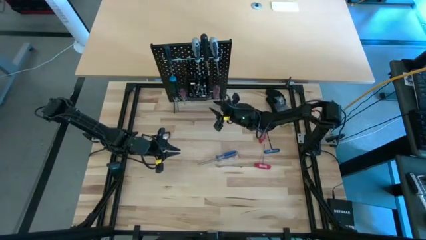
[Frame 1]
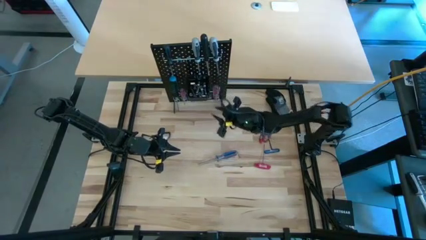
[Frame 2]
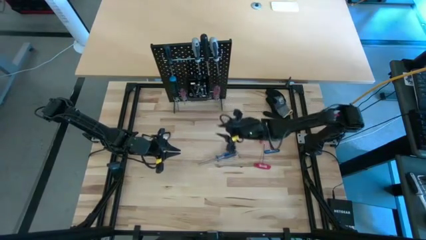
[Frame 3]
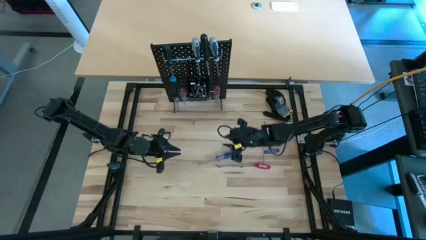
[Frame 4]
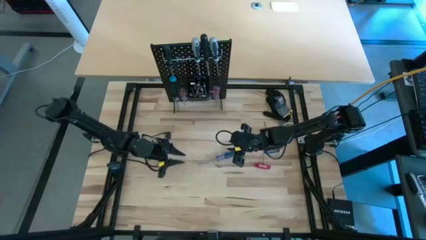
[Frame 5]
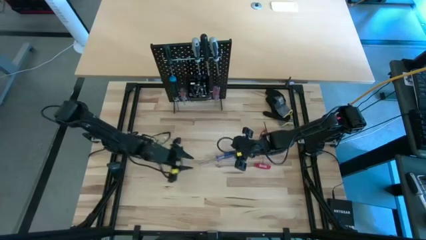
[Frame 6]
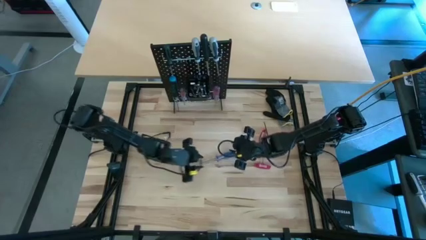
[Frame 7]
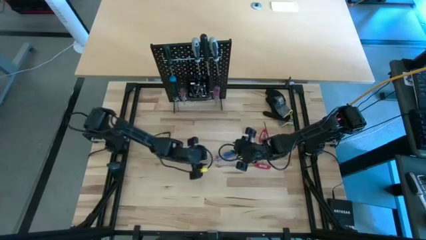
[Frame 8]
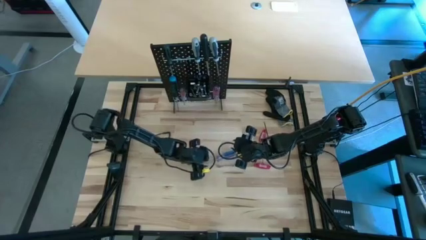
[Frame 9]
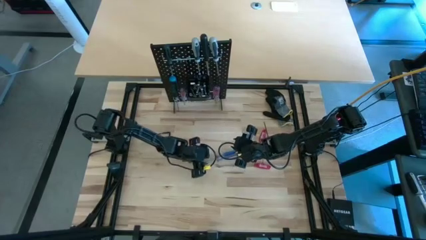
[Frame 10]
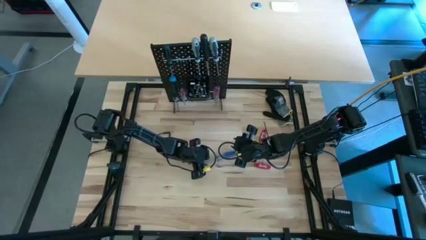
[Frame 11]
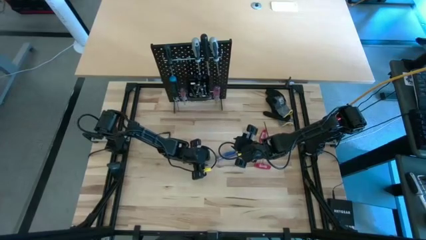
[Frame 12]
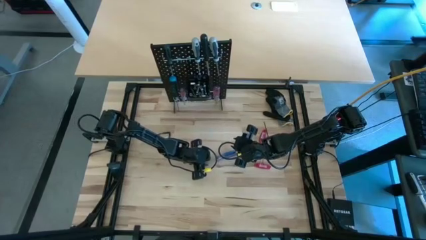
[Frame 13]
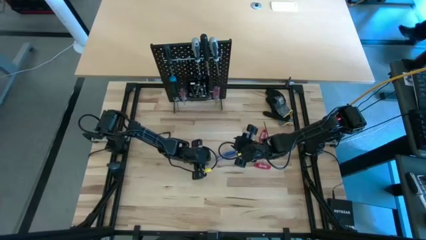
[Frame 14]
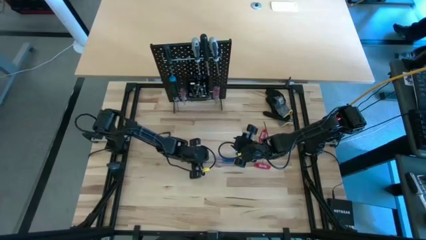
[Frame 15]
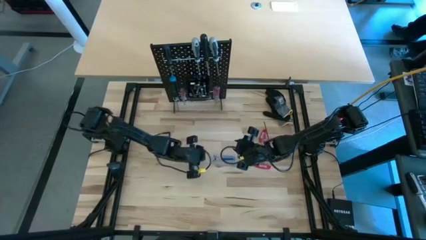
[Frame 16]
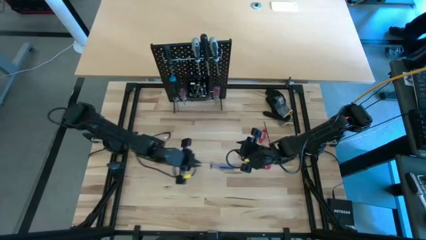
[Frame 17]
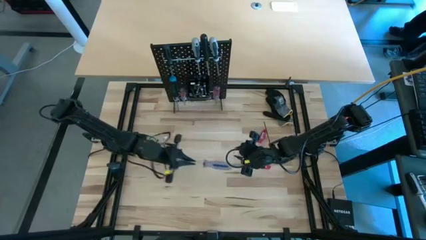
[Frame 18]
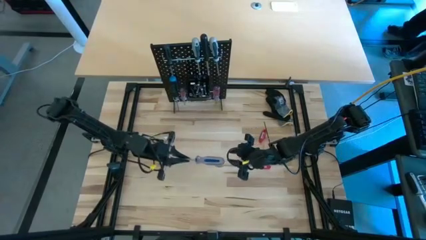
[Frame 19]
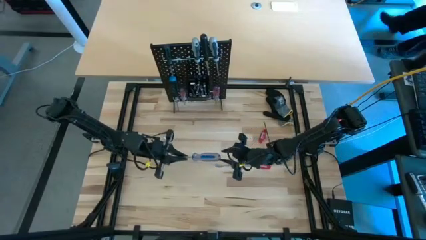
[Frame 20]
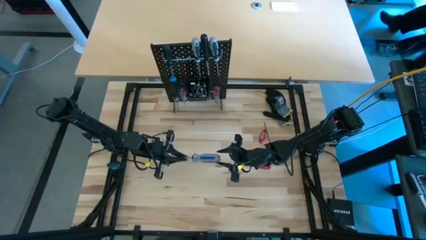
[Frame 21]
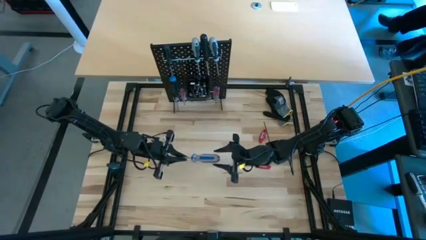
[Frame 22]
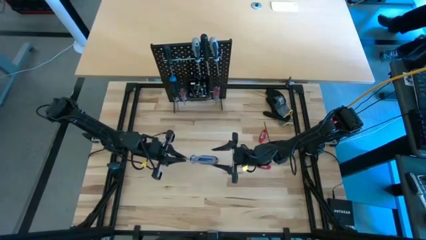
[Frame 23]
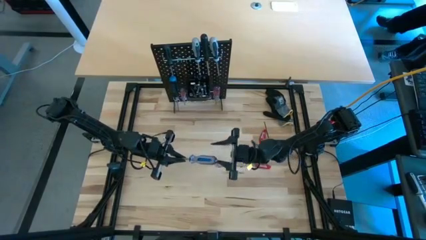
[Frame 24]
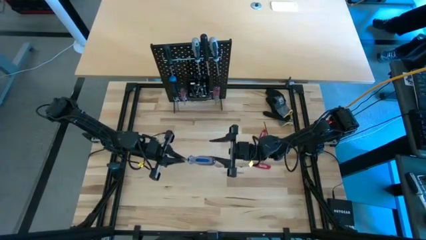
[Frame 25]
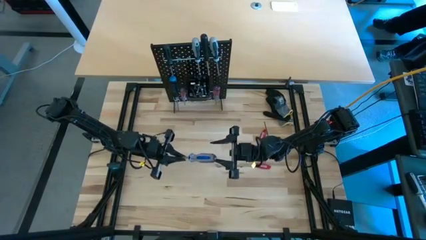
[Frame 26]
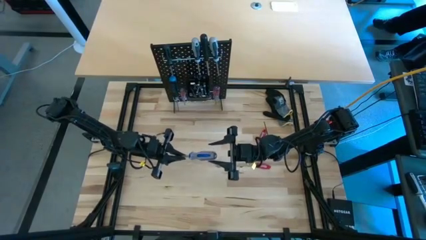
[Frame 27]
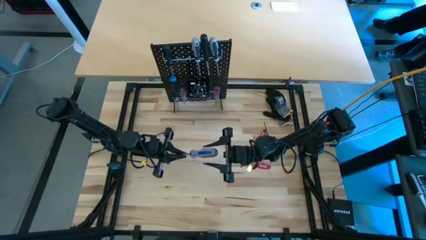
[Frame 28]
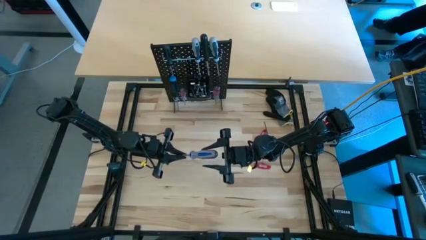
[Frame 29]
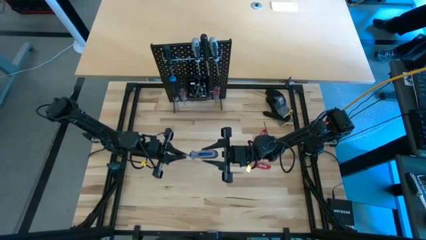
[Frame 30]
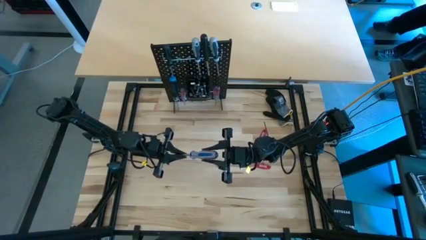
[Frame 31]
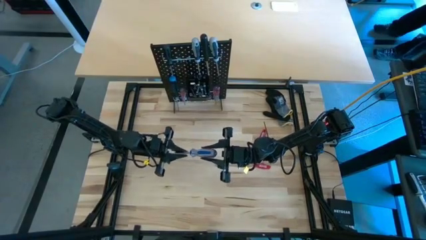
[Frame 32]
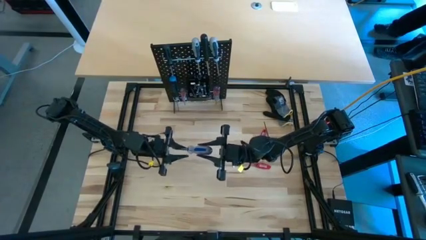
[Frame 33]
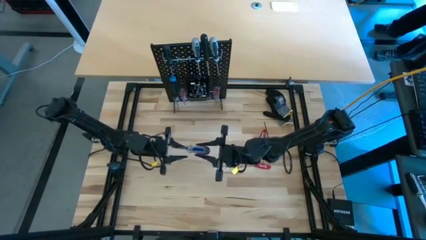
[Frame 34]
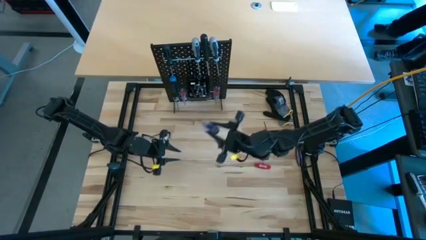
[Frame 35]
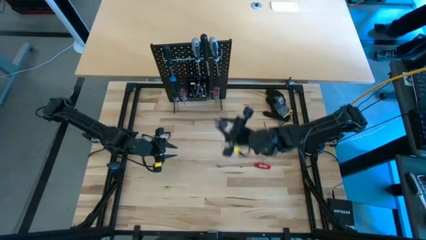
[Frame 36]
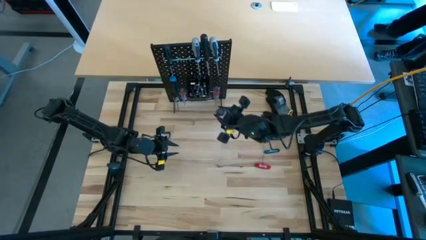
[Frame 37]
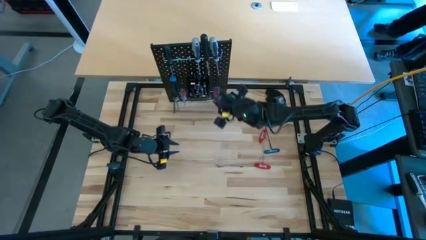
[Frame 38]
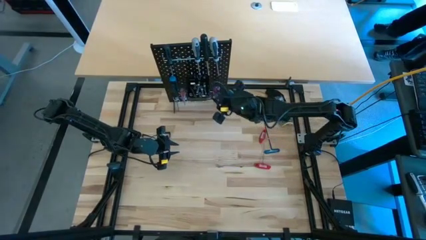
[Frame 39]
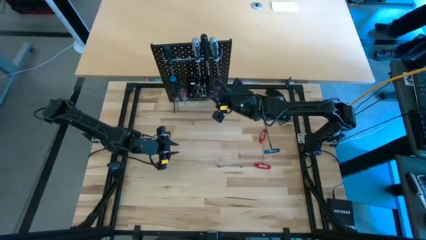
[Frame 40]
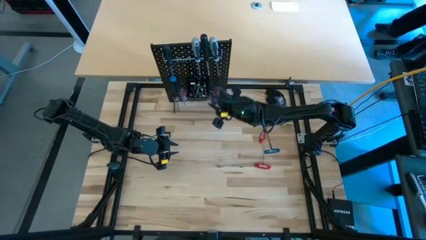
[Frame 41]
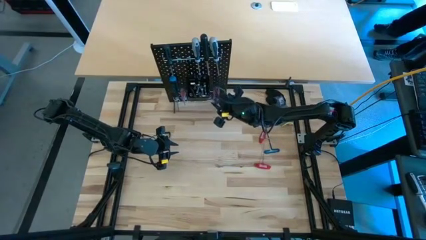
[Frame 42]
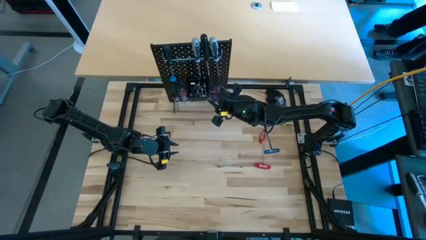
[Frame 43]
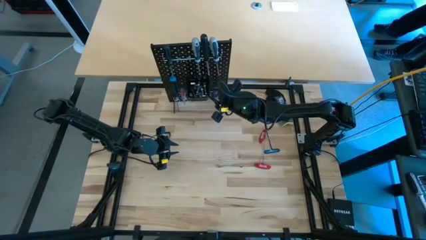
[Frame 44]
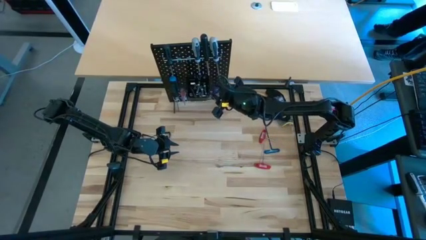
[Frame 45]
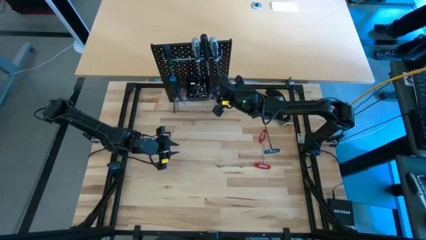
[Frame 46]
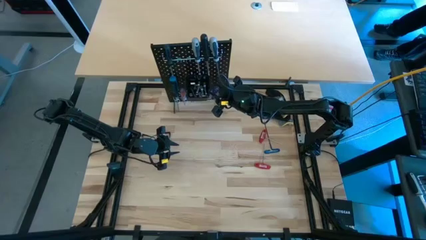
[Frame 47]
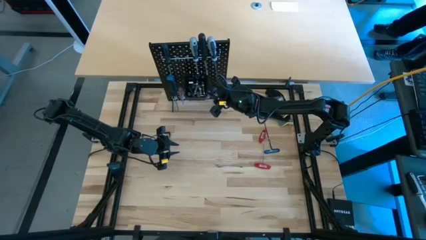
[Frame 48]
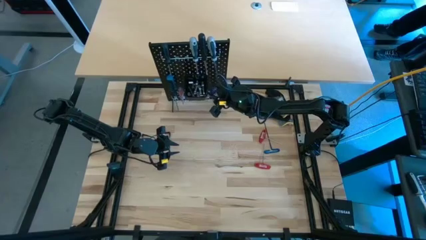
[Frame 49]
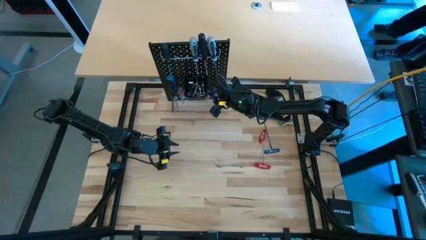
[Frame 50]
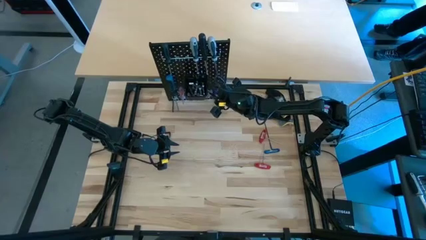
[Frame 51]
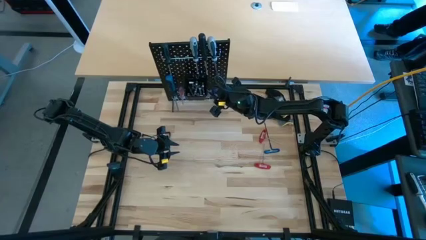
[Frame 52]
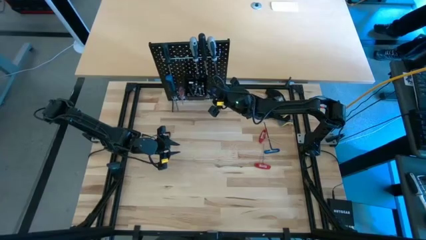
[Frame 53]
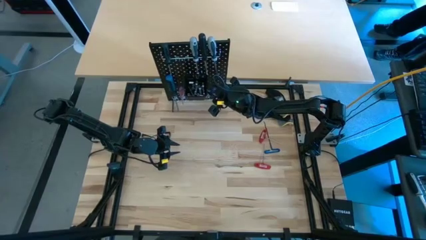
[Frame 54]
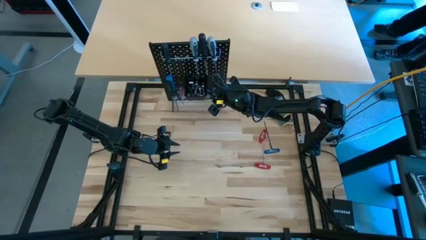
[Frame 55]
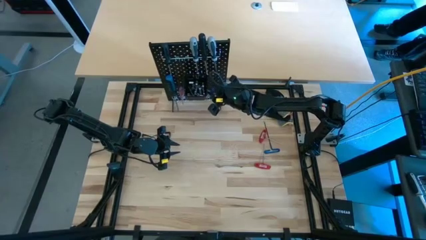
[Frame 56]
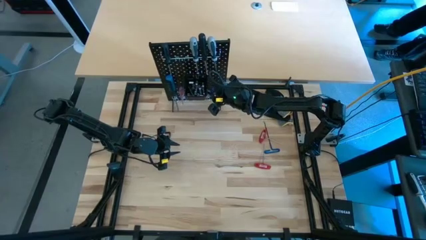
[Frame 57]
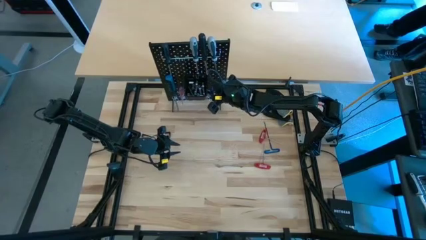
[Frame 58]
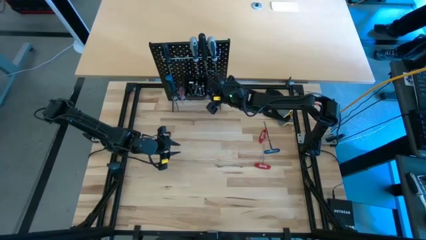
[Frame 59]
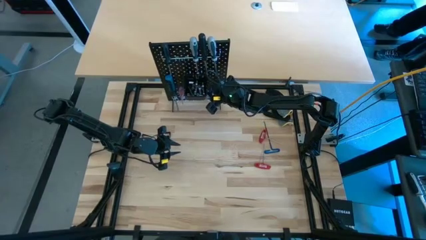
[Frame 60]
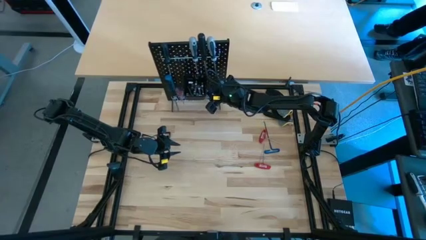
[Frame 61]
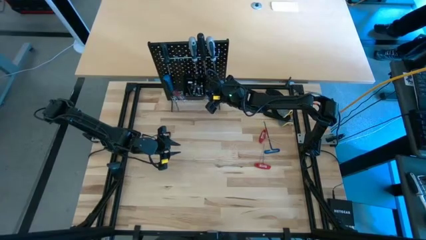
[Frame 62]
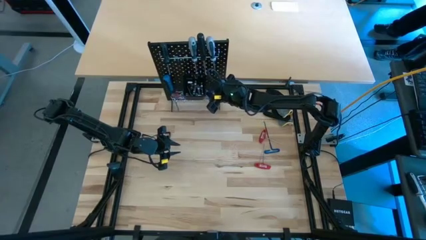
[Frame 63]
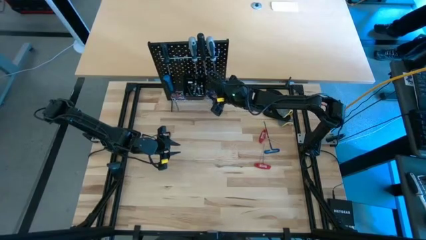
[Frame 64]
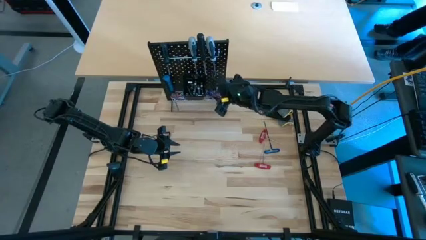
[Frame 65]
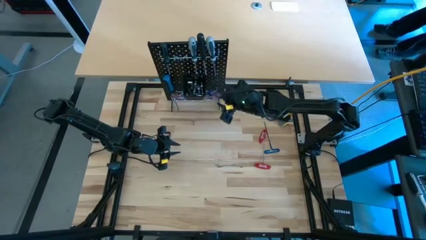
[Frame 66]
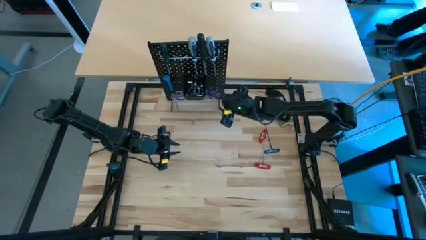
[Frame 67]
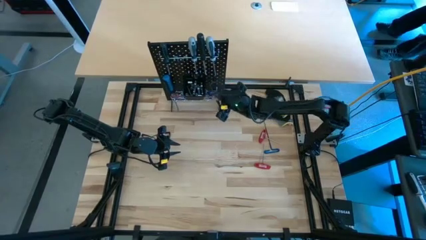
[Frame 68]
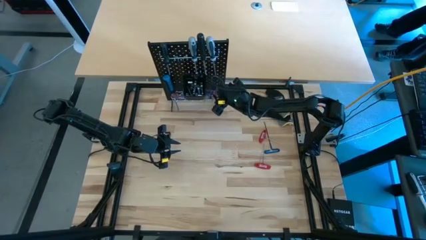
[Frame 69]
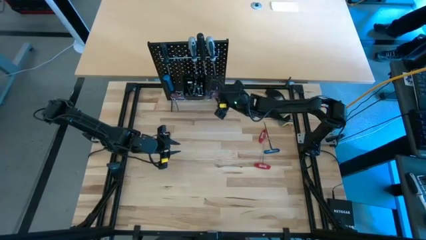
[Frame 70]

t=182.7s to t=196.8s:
Task: Hang tools onto peg board
Hang the blue and transparent screwdriver on the peg board

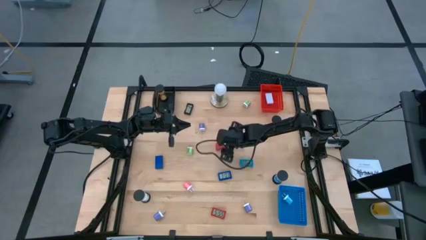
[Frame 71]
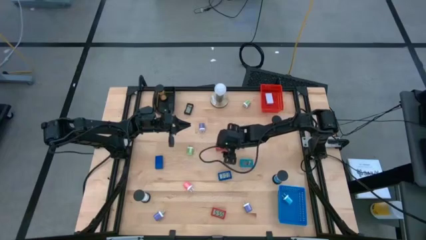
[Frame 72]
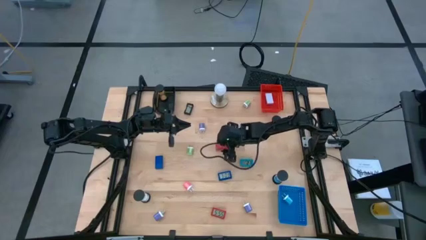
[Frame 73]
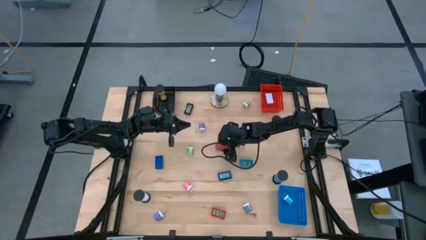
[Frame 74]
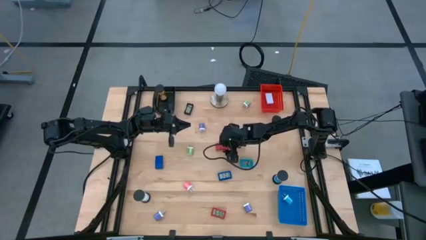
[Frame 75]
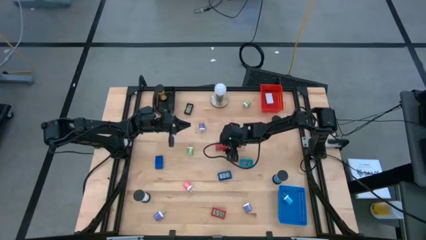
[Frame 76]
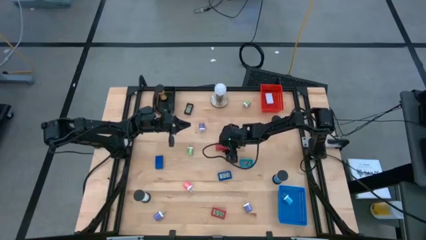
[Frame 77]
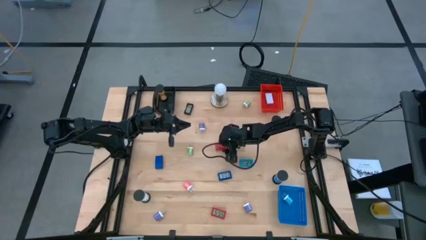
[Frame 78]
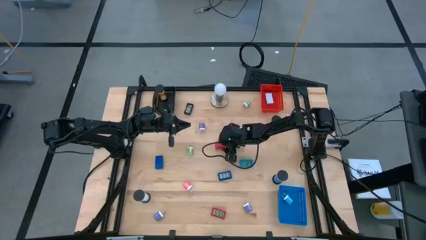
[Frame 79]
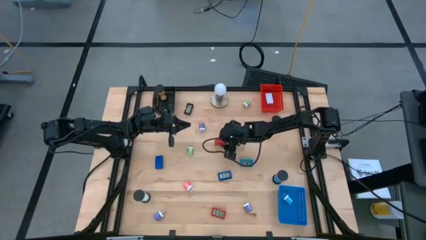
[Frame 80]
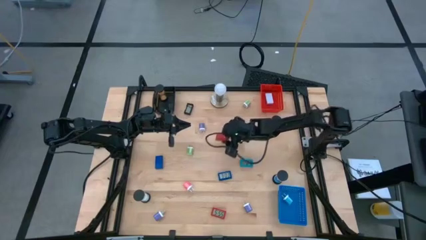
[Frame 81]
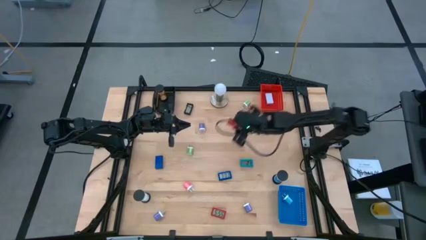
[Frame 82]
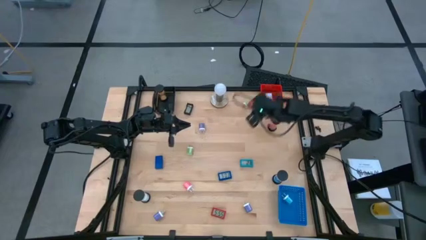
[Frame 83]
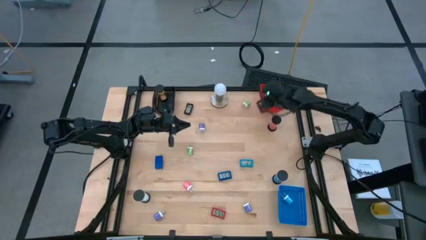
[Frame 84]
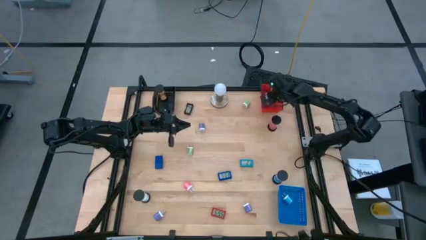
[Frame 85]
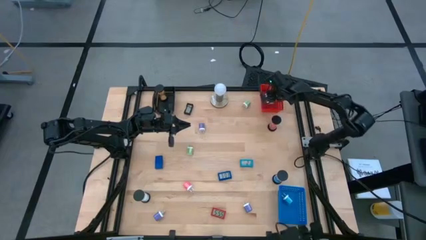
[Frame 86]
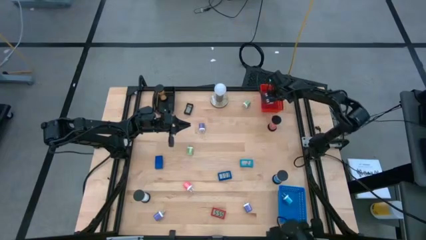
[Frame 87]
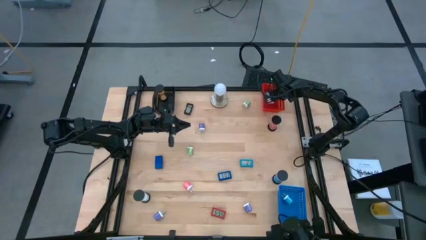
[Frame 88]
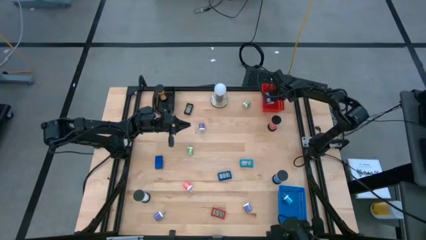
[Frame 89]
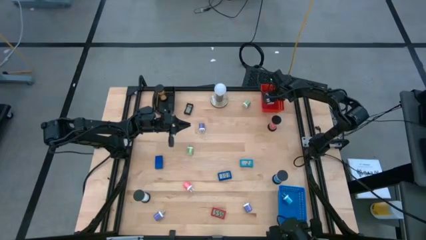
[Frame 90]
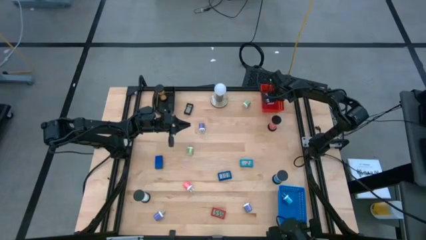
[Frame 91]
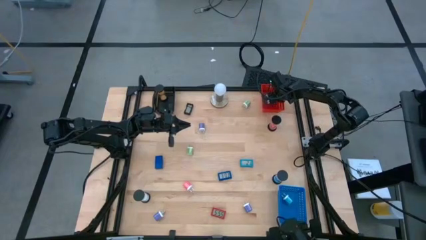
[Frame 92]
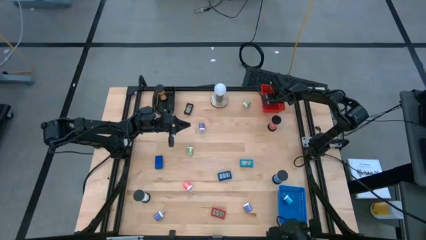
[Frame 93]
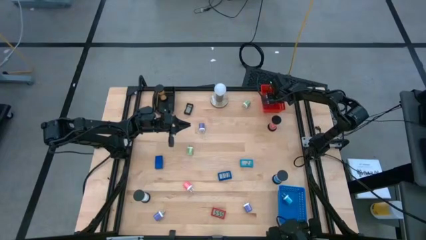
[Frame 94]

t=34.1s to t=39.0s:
Task: Pick & Place Office items
Put the top red digital clock into the red bin
